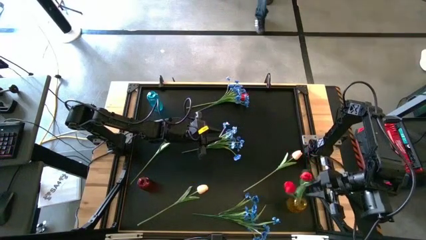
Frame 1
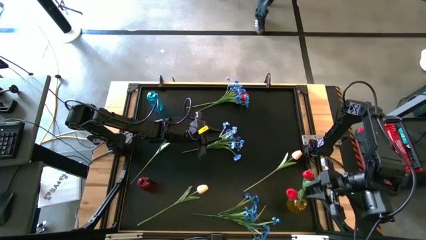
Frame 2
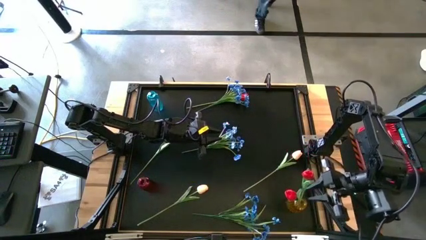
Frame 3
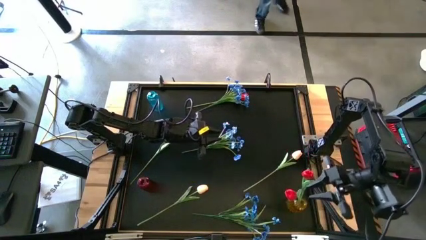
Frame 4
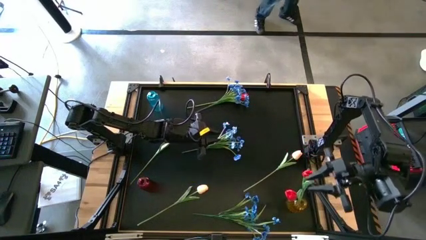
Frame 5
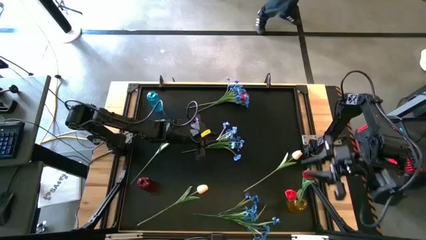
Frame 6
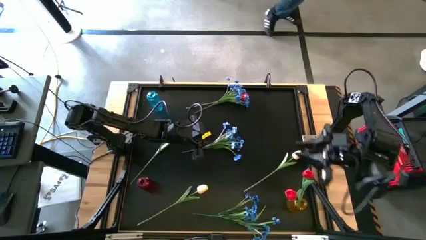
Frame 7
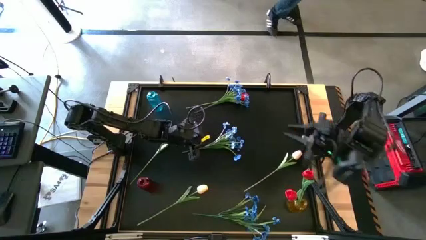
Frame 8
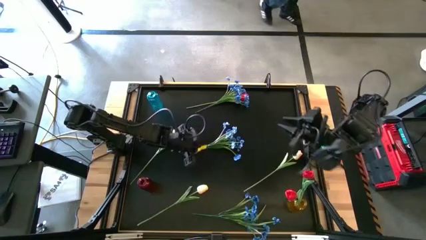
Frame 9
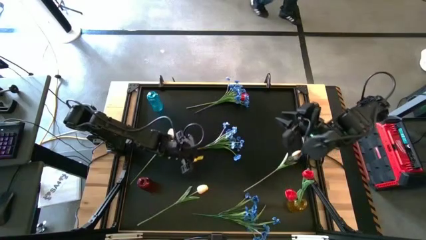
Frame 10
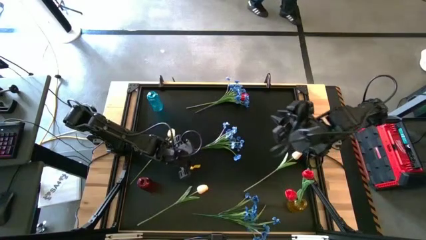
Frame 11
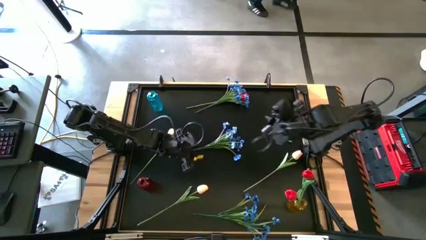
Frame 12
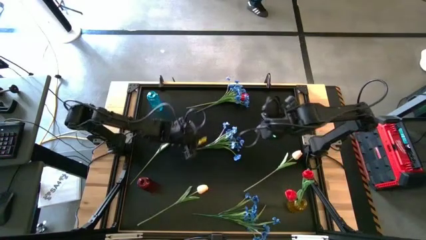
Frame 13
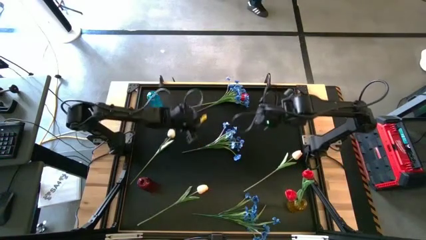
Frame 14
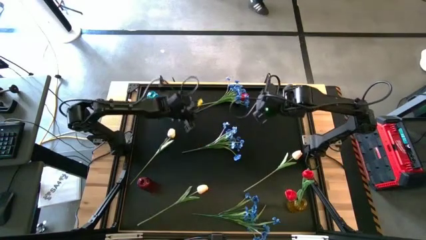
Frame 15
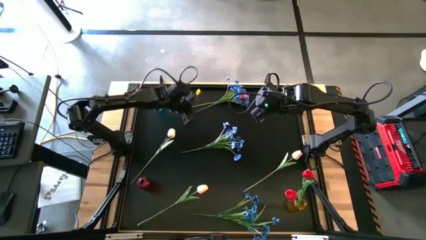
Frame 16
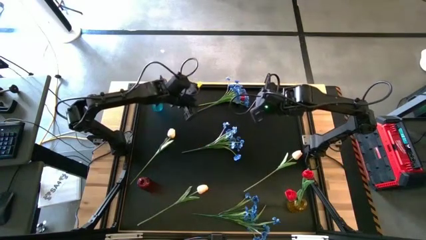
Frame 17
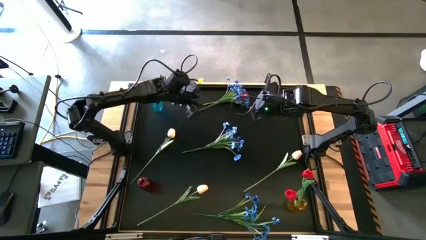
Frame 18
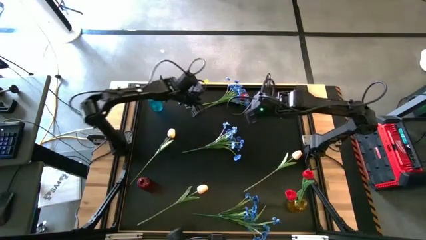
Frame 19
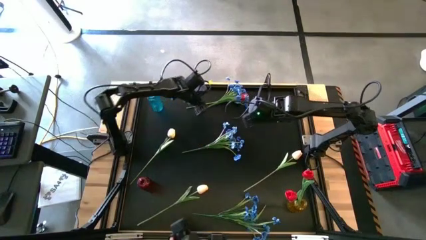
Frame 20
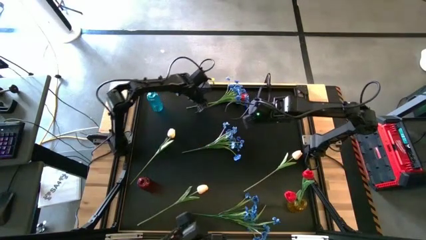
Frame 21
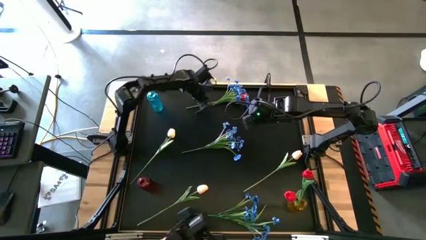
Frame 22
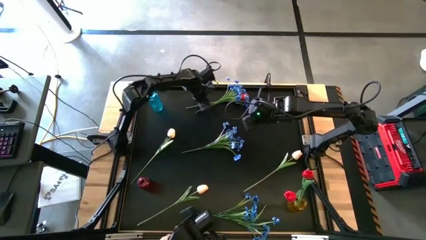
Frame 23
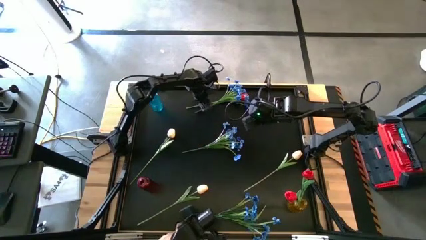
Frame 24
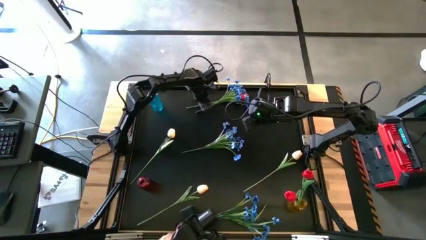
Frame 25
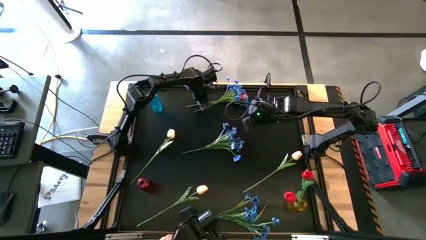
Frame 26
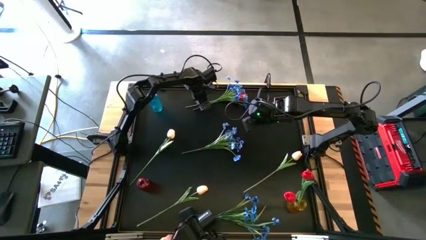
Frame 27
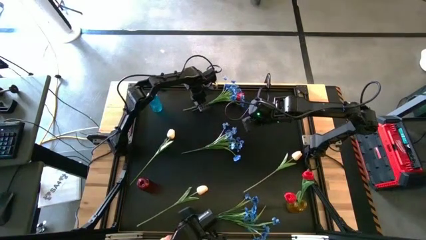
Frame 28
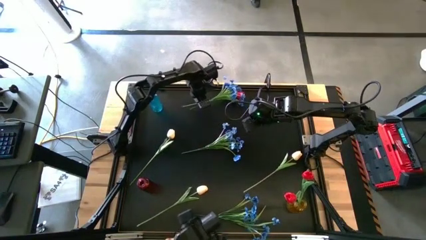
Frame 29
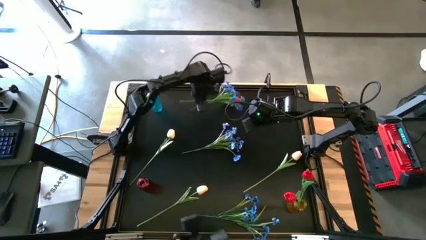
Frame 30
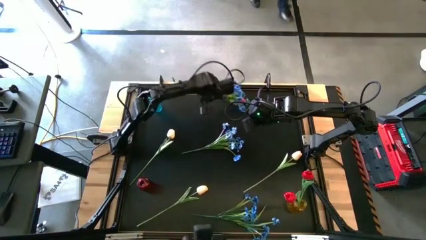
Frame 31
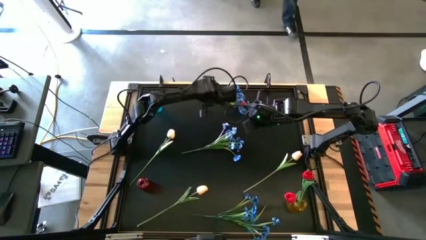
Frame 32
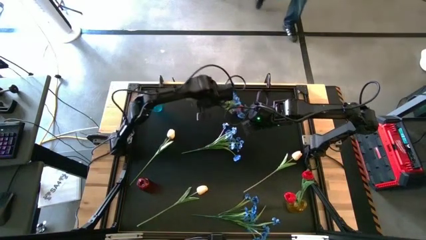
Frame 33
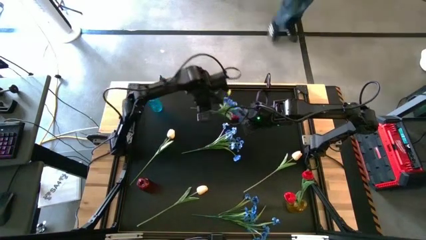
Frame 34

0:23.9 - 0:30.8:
Task: Sort flowers into vase by color
Put the red flower into the yellow vase

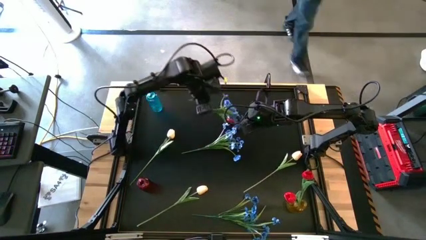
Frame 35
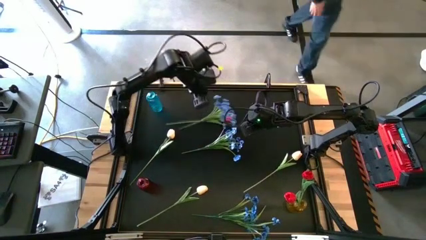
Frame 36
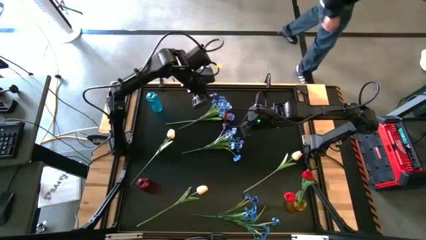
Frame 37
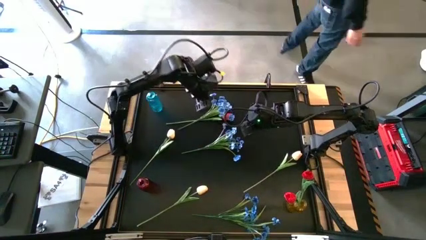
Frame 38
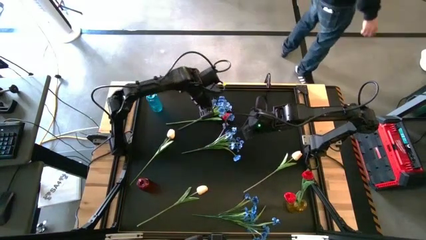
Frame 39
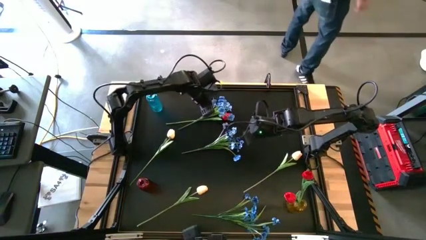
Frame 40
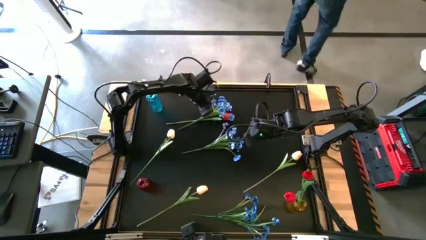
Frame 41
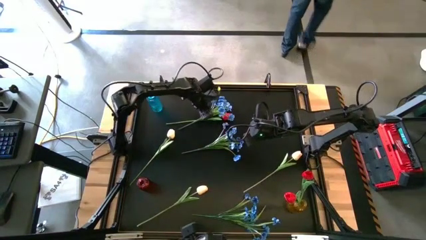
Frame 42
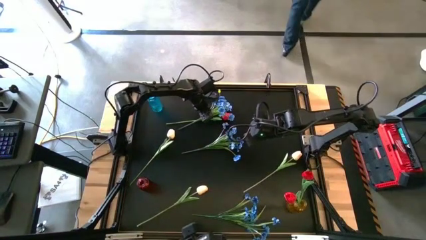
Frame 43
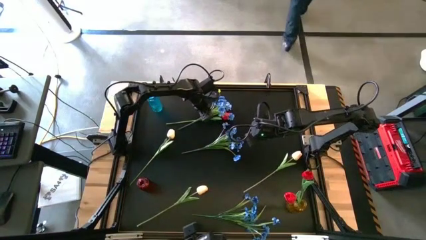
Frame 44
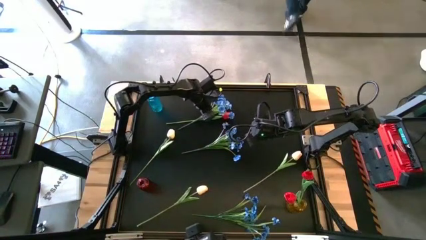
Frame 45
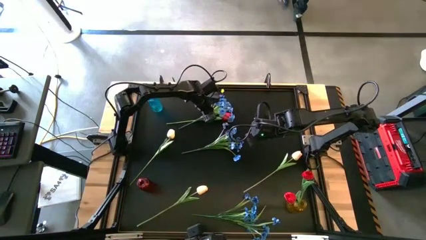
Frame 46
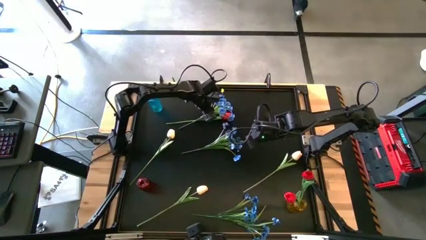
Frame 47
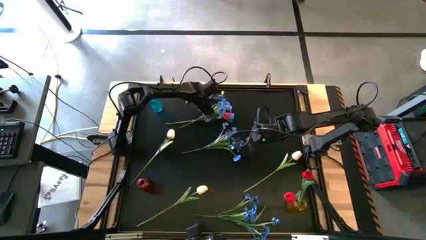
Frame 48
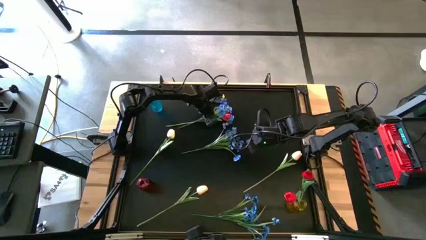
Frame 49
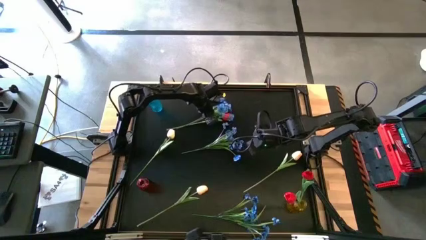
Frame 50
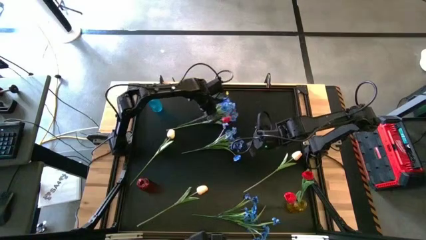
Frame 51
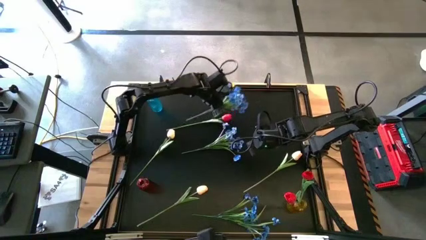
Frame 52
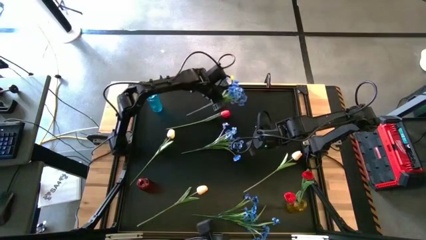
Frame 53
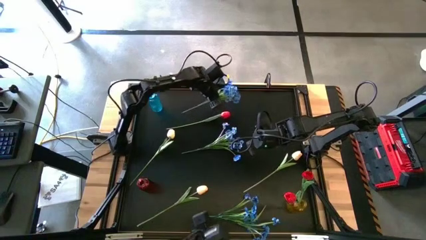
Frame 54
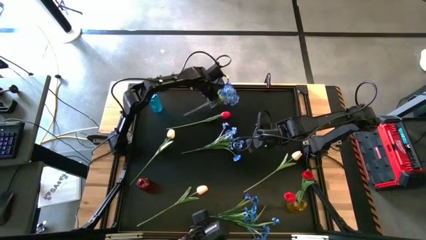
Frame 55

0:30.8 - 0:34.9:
Adjust the blue flowers

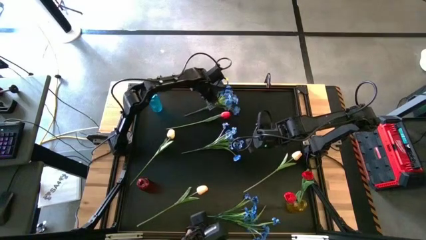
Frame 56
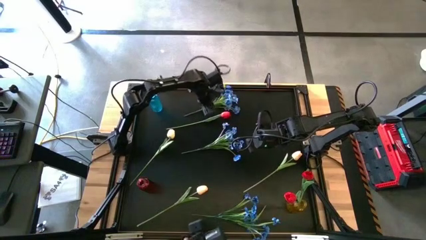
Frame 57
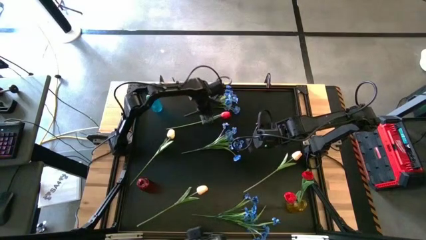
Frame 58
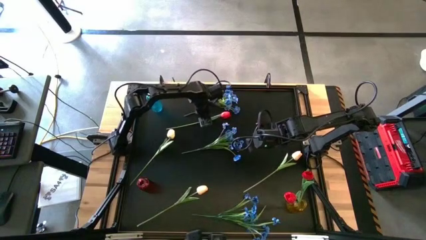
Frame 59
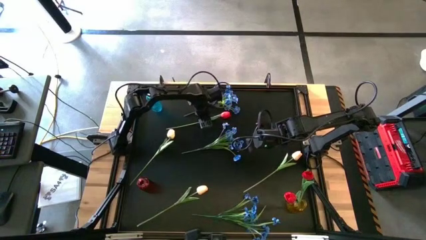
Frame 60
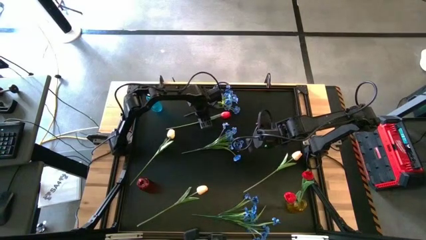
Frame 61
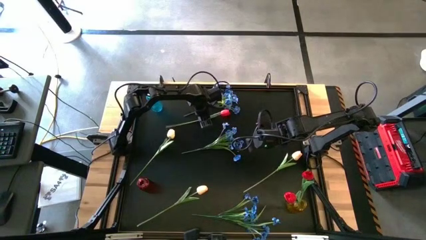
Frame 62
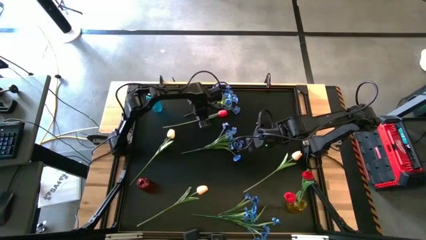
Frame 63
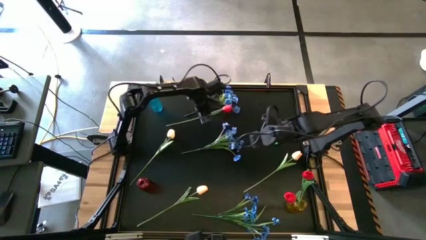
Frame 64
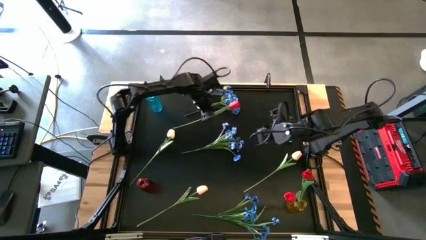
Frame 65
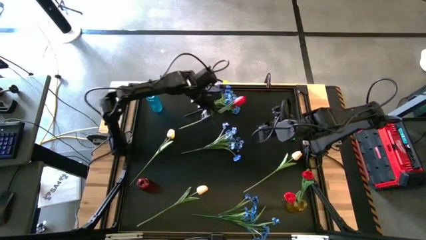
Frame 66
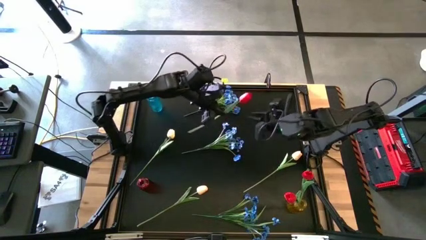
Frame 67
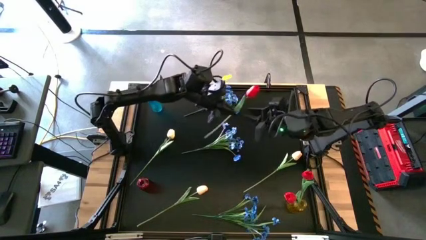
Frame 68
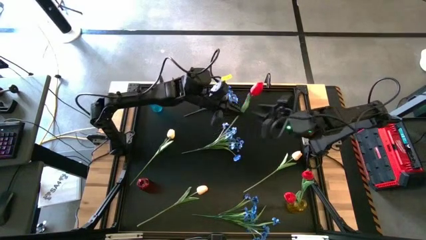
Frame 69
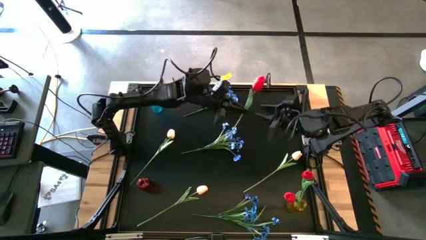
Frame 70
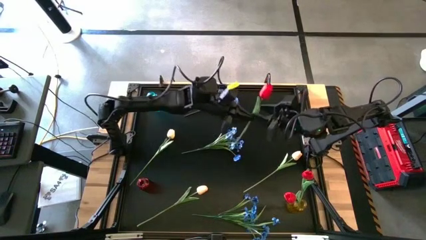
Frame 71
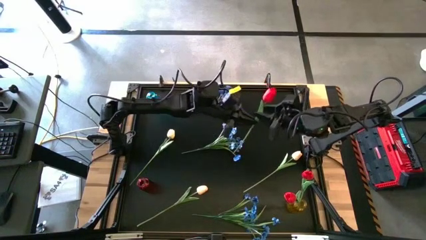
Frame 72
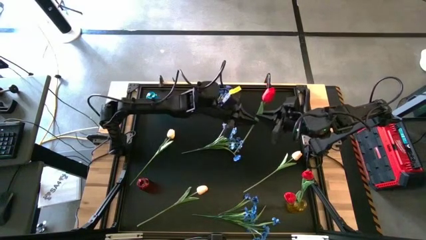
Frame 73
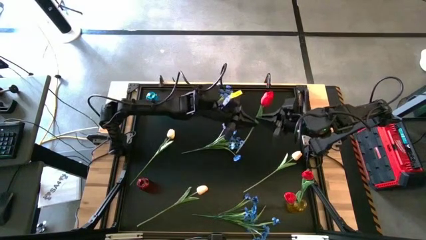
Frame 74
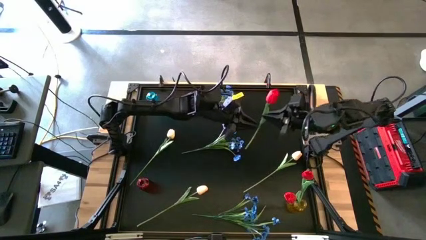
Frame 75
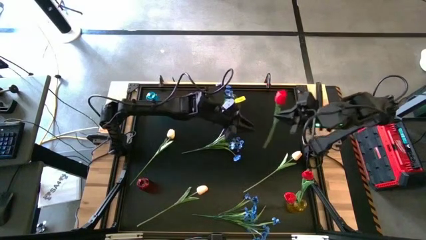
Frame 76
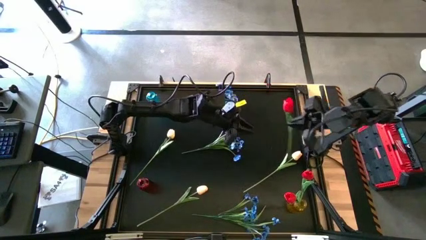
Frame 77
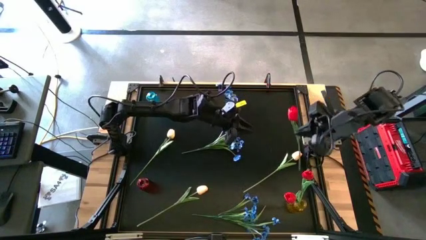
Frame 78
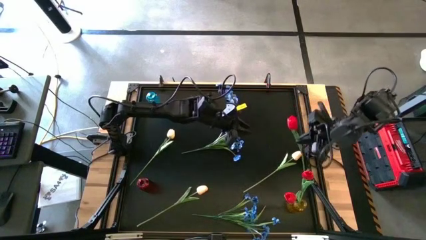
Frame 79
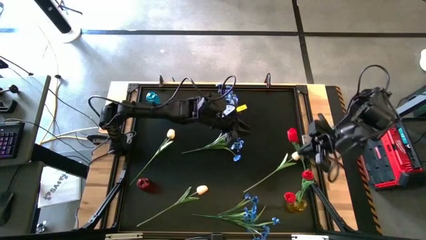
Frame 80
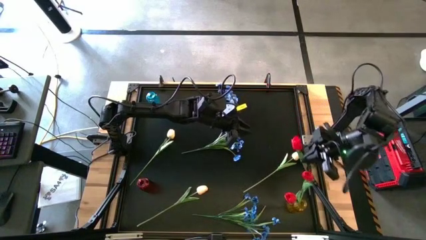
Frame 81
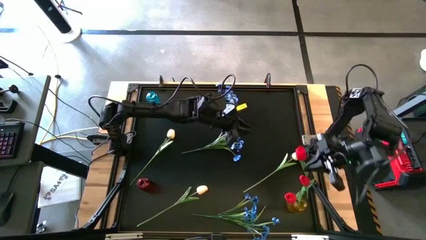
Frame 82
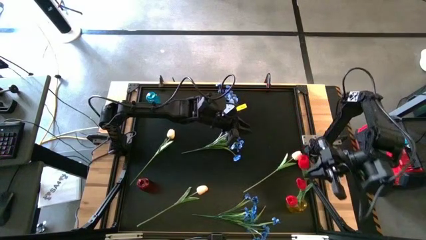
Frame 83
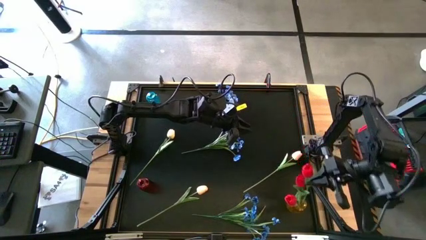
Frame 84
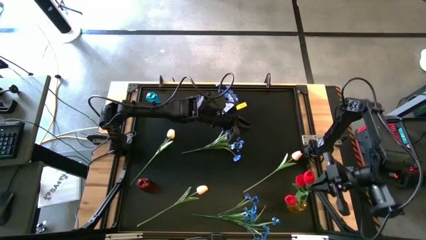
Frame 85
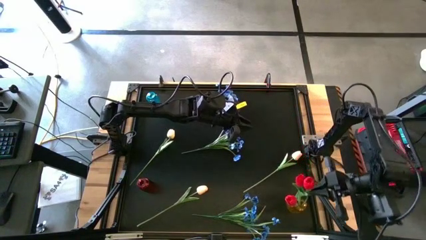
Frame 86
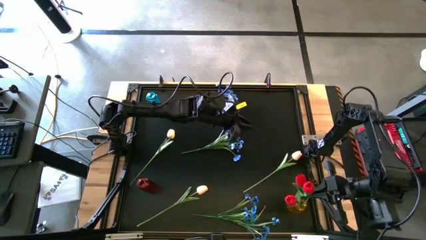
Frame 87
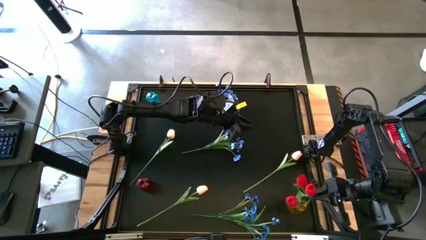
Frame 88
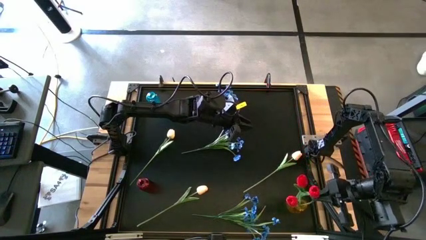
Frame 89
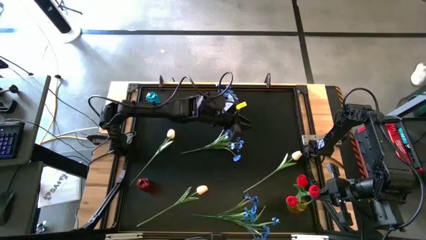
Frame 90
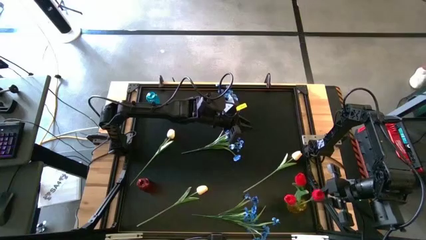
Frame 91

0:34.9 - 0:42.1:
Put the red flower into the yellow vase
